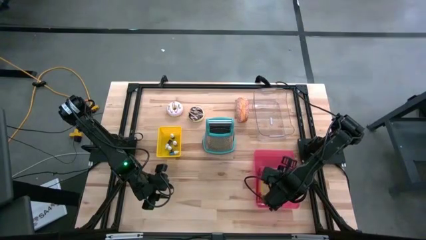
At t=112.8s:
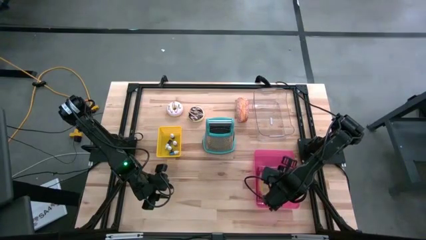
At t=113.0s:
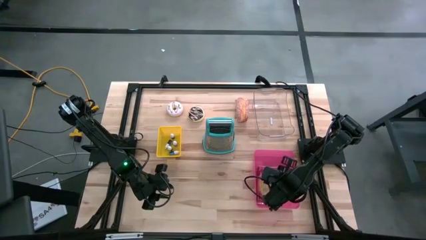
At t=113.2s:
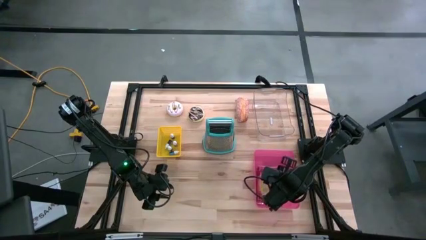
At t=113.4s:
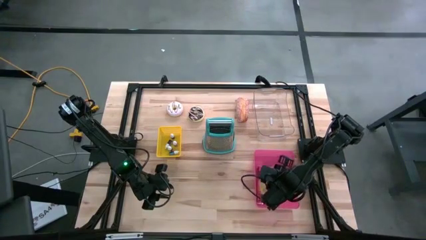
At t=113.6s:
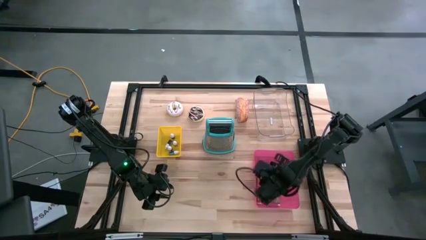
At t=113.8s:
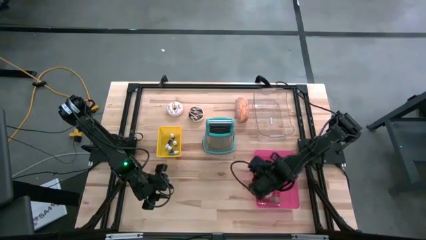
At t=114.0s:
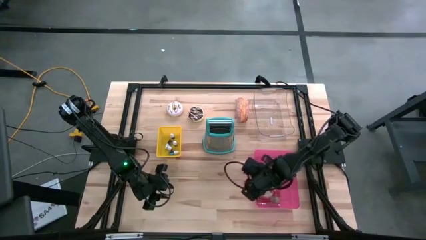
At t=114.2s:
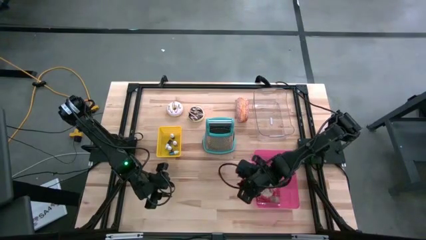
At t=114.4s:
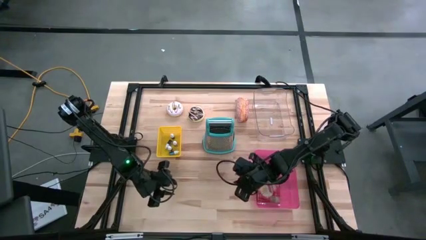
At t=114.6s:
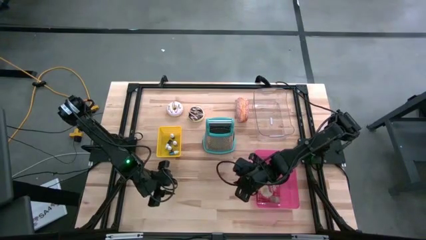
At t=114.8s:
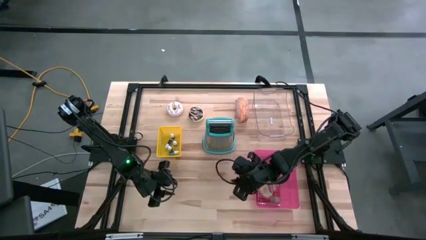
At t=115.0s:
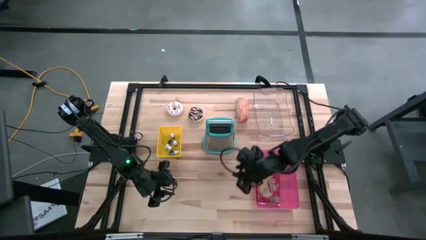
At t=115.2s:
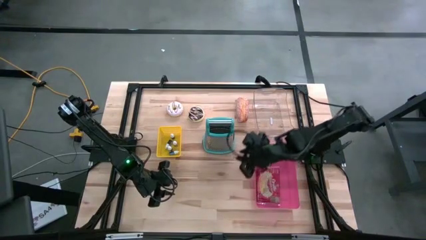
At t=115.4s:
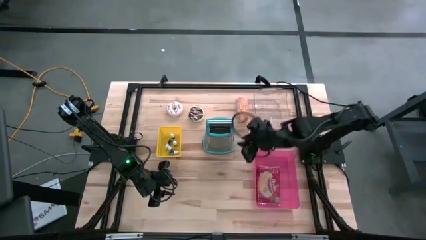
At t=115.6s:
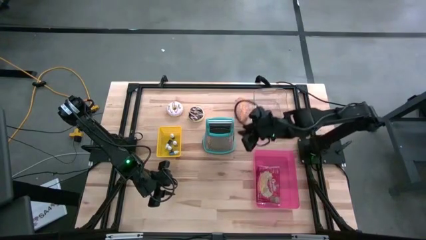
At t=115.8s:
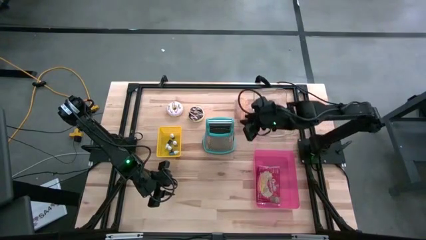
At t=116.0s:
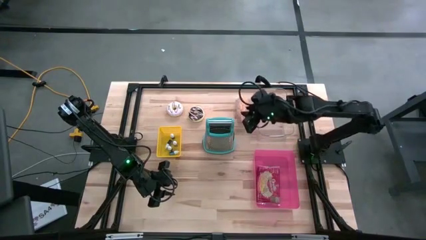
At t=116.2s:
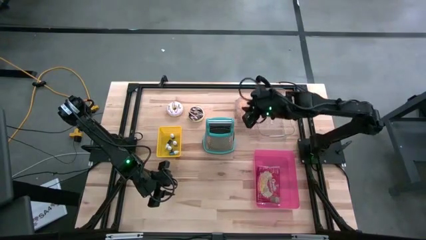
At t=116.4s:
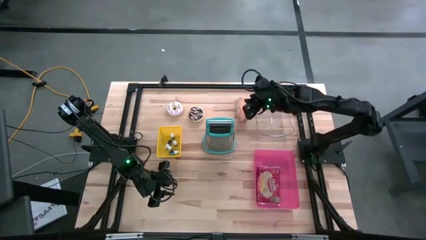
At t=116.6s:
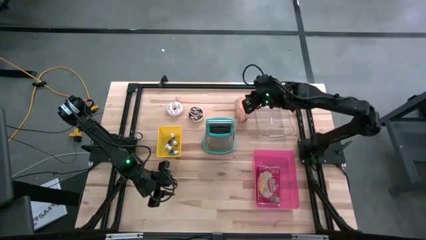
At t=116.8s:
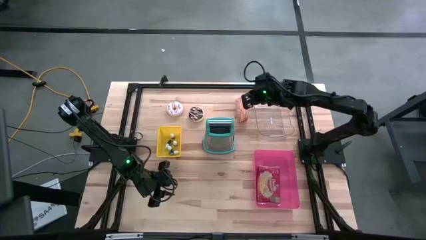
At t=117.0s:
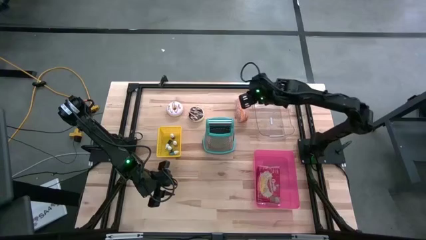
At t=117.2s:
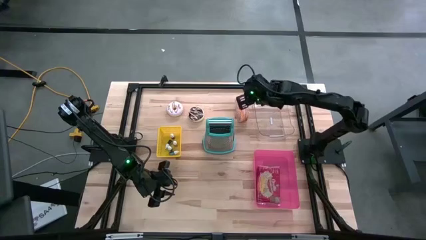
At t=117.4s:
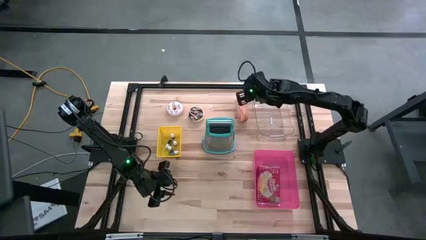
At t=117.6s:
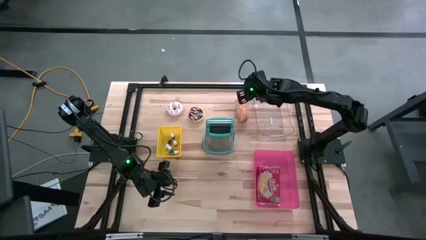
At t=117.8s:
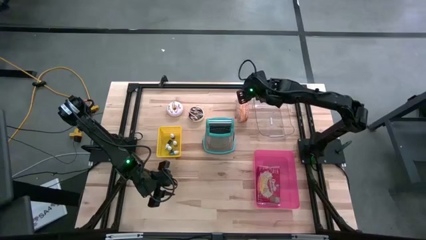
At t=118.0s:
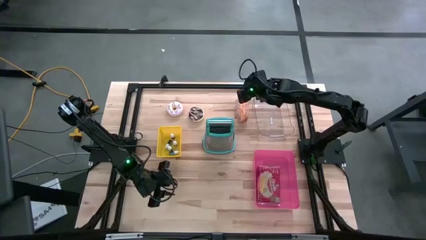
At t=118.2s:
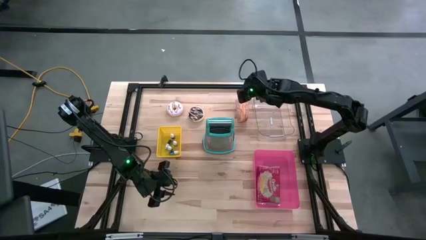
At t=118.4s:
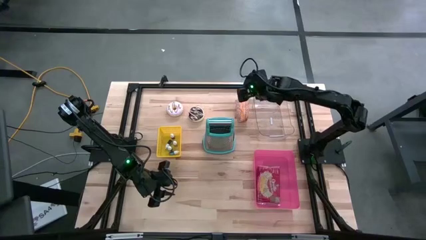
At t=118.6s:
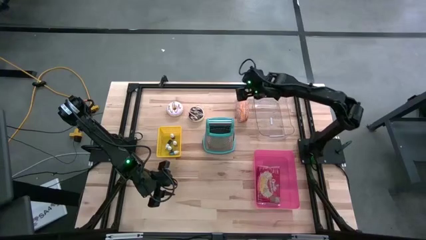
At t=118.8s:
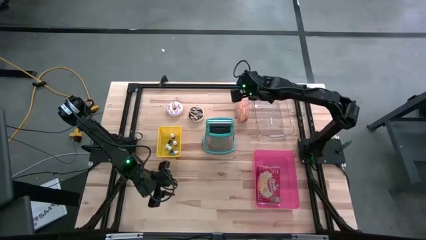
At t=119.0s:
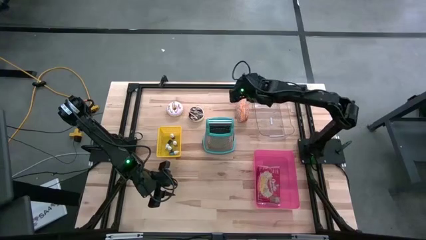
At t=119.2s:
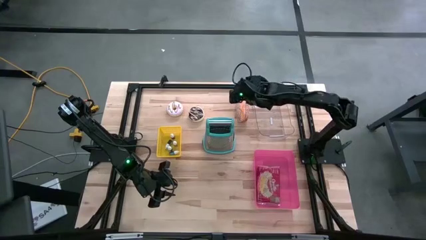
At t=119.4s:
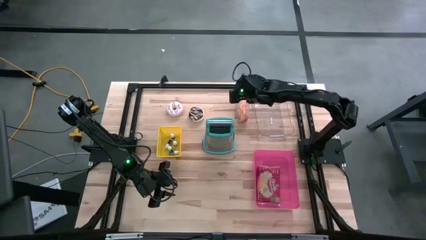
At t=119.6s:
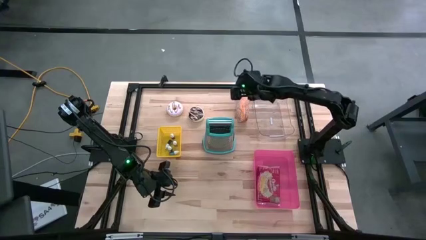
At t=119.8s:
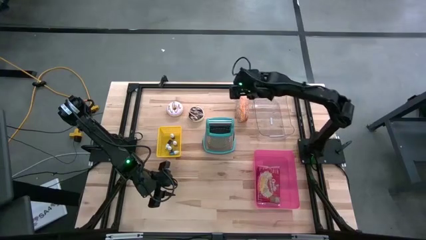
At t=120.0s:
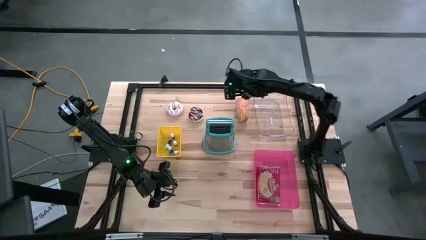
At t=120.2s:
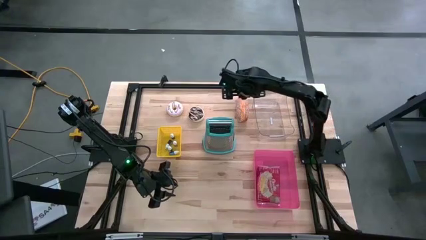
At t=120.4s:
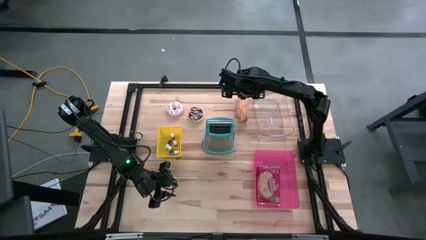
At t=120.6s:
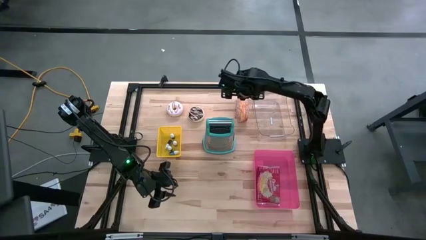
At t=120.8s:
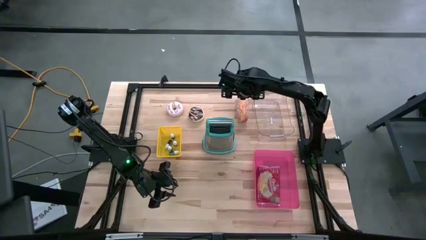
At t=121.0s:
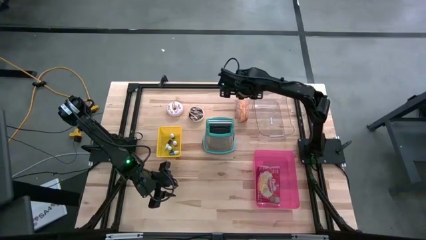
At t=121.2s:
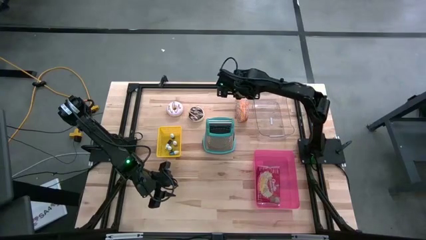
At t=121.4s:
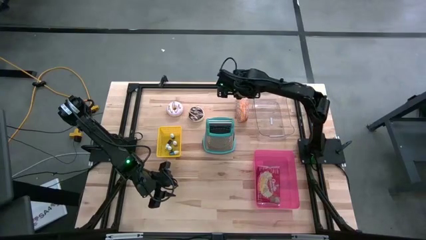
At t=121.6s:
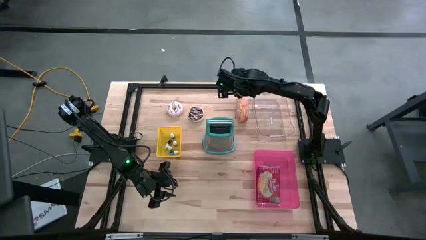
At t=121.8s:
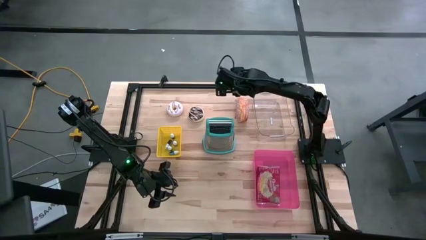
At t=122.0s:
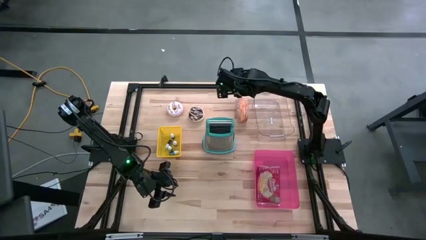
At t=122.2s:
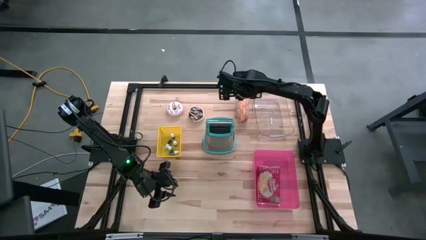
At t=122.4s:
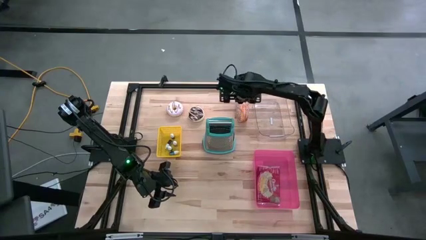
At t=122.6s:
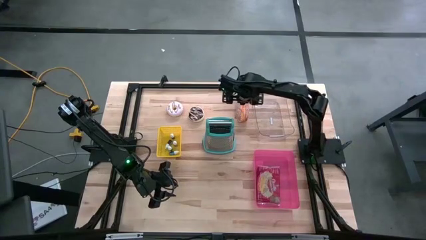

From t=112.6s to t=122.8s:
Put the bread into the transparent bin

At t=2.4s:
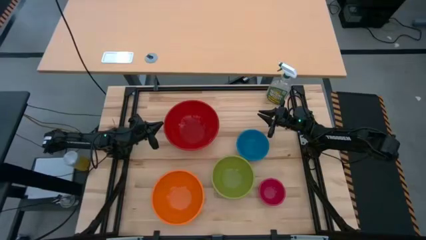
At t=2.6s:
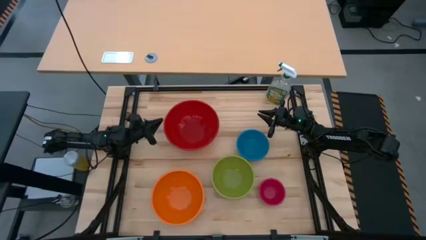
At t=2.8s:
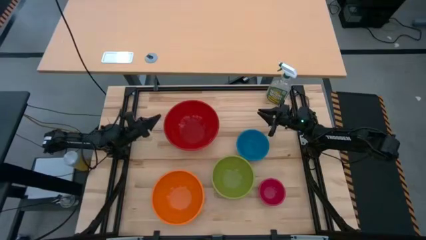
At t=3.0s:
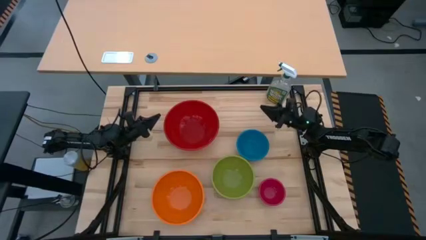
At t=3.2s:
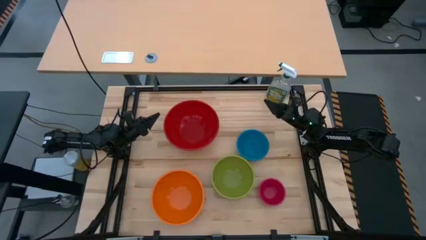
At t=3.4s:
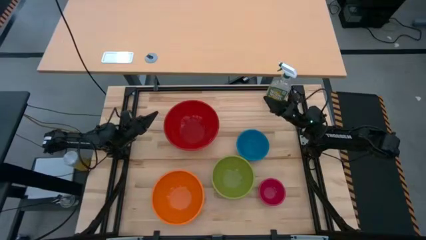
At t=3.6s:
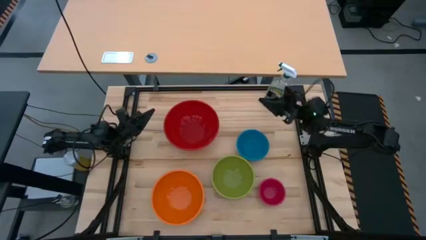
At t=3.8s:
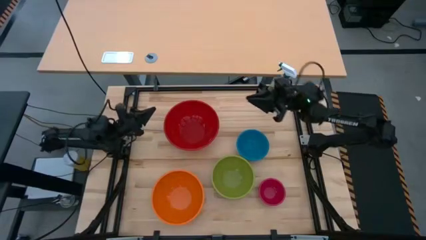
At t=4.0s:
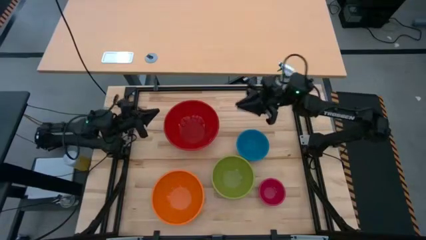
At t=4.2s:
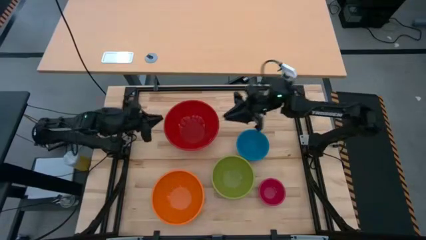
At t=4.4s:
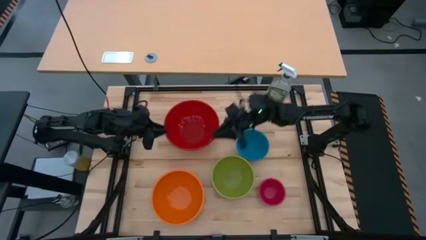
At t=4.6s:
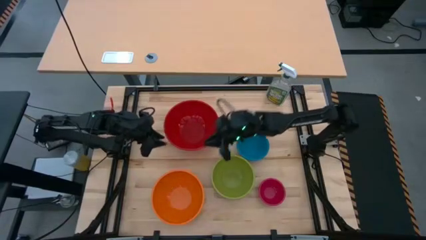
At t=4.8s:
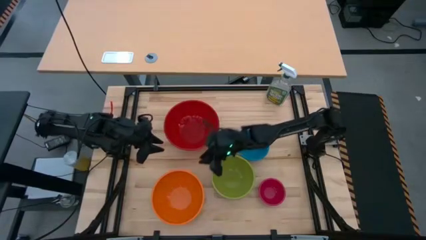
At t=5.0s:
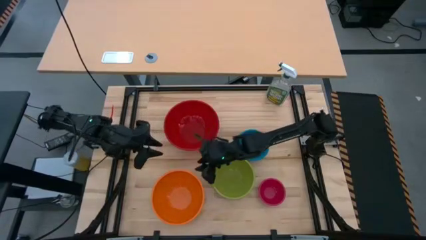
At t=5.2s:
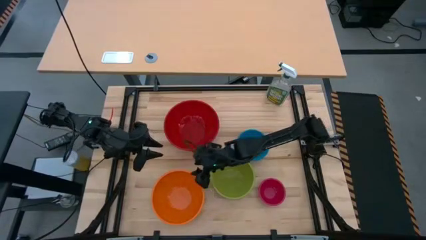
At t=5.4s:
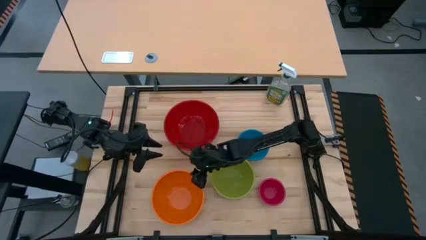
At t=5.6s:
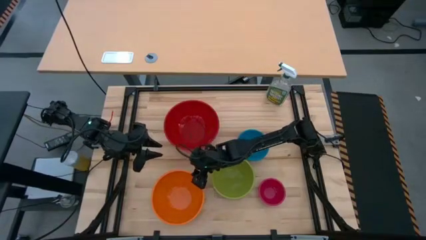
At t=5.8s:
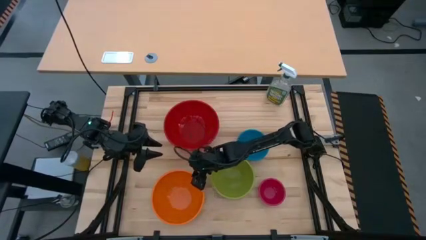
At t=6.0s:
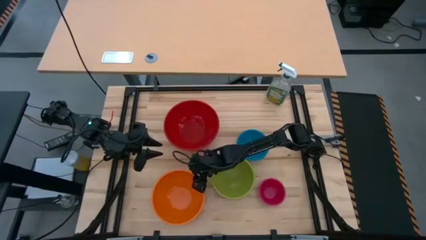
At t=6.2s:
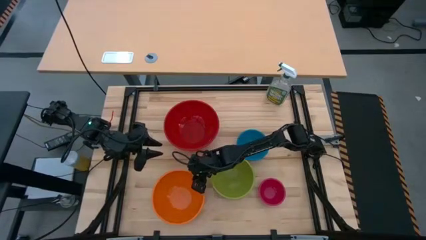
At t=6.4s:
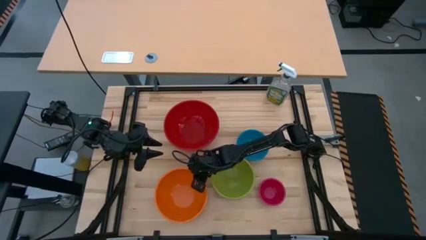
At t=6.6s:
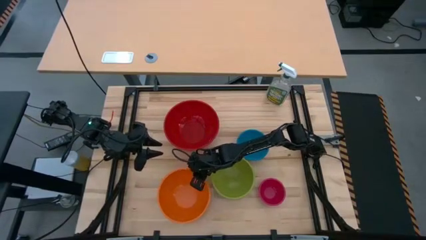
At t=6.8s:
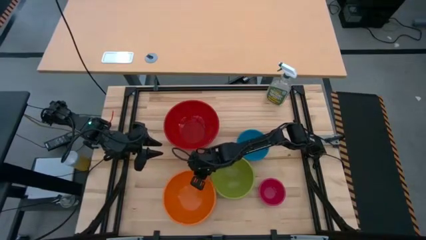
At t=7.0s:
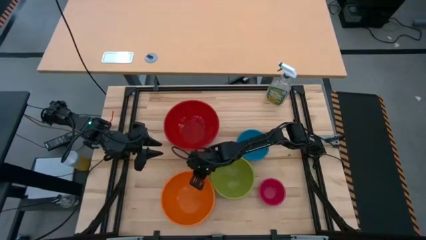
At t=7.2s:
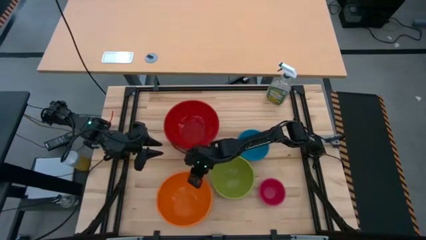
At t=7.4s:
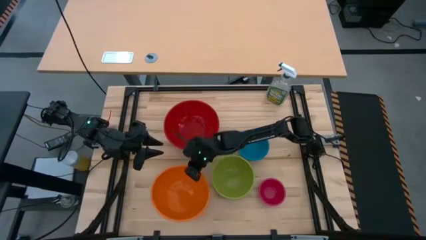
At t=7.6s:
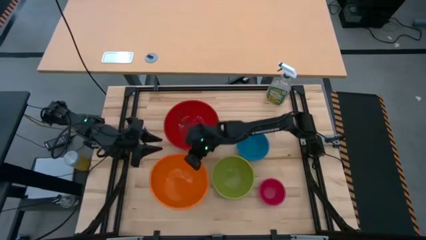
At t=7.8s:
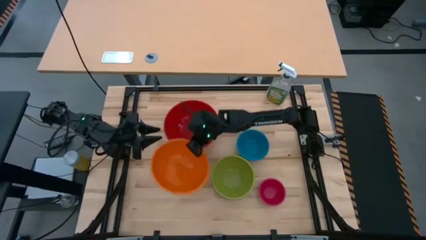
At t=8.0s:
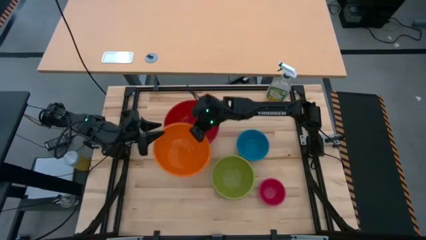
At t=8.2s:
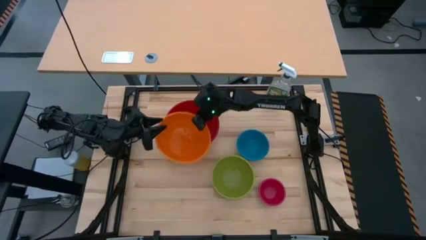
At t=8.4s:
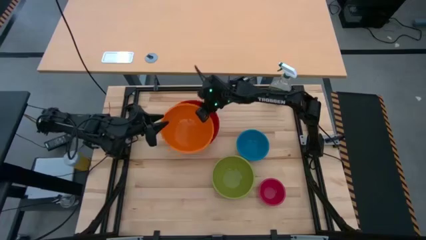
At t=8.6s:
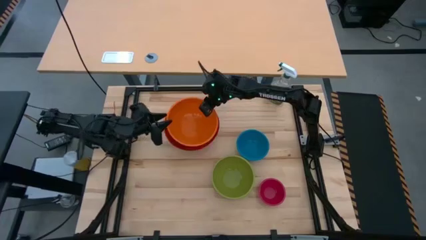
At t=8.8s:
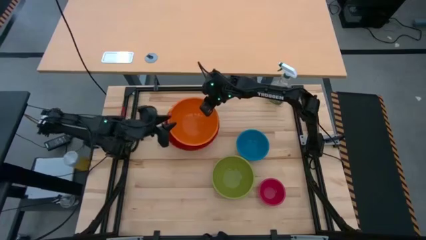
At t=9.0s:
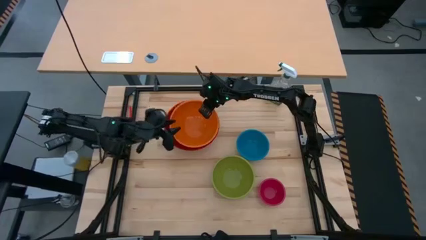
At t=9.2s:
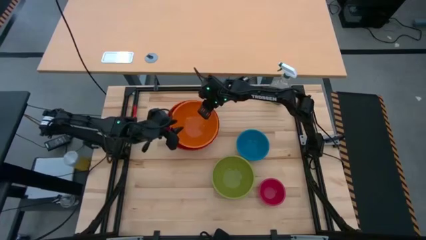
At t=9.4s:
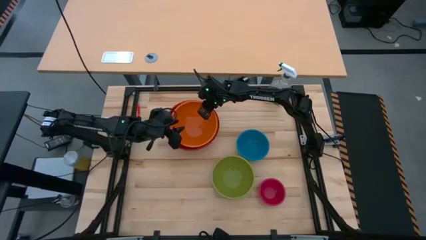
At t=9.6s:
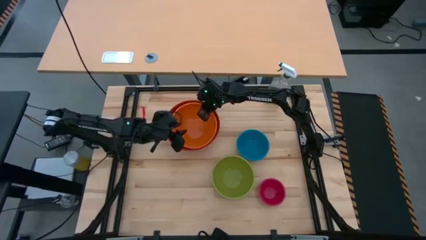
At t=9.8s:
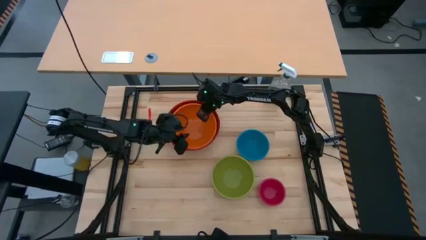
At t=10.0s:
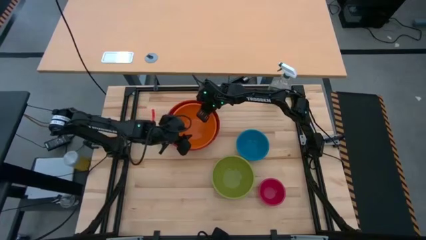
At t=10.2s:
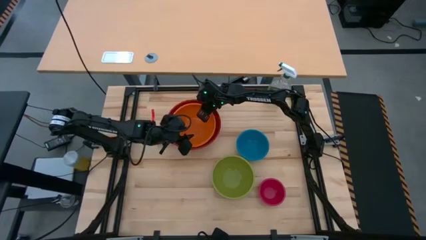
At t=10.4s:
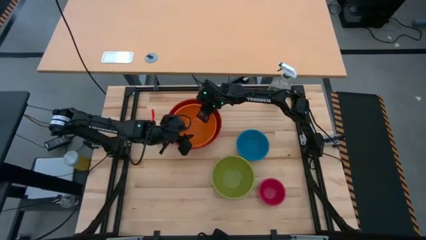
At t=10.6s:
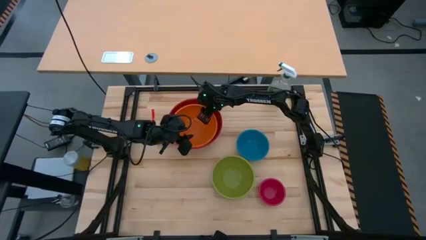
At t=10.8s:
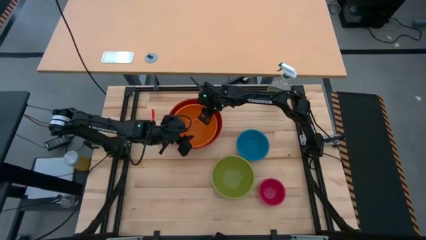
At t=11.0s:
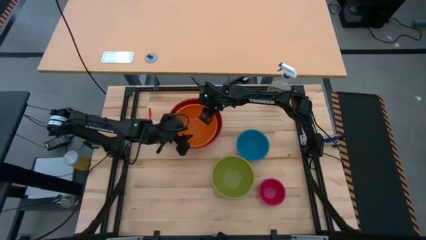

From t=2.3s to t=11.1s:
Stack the orange bowl on top of the red bowl
